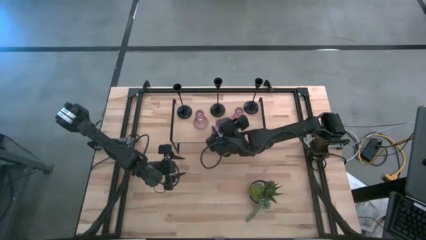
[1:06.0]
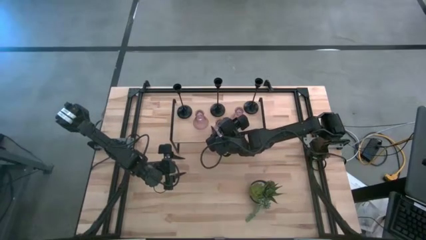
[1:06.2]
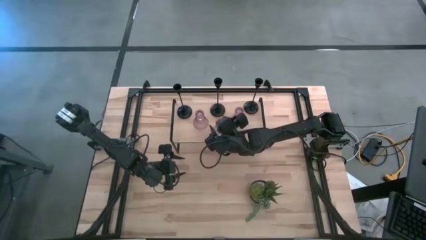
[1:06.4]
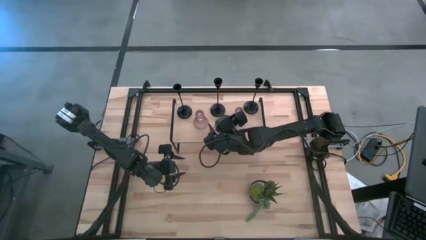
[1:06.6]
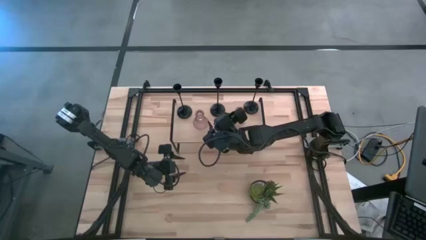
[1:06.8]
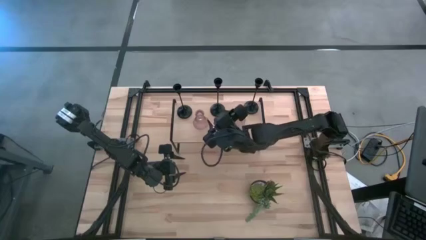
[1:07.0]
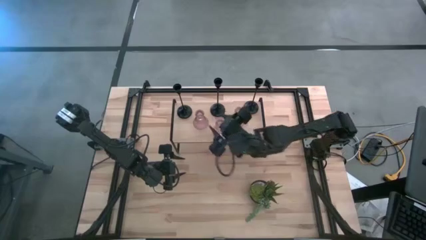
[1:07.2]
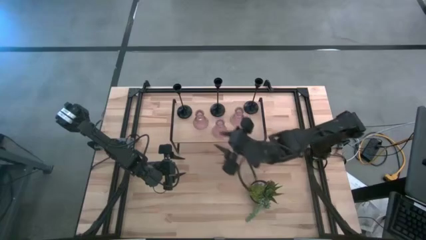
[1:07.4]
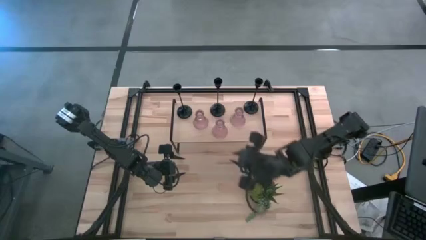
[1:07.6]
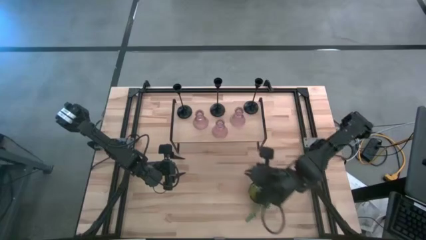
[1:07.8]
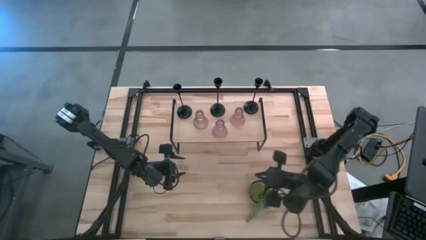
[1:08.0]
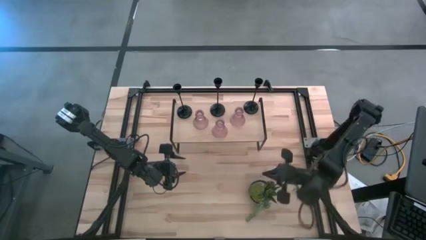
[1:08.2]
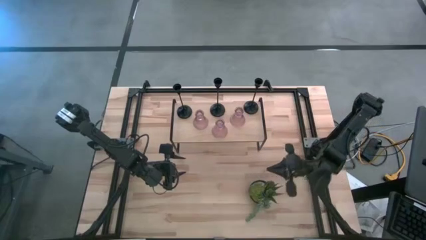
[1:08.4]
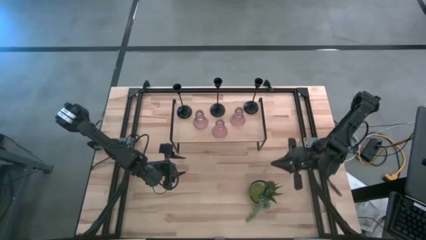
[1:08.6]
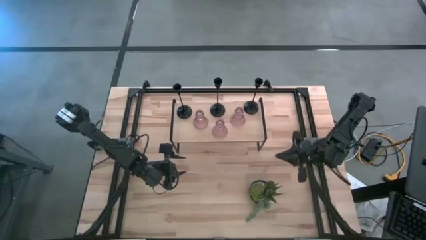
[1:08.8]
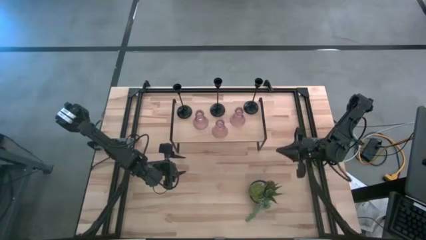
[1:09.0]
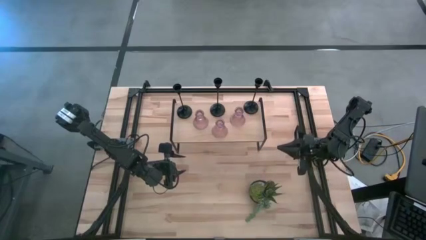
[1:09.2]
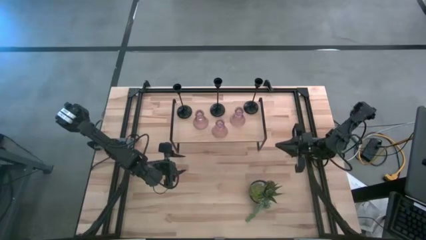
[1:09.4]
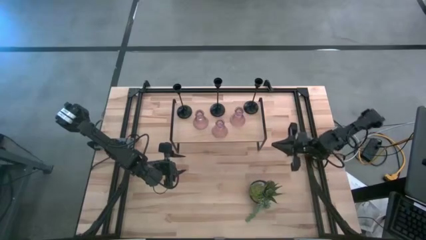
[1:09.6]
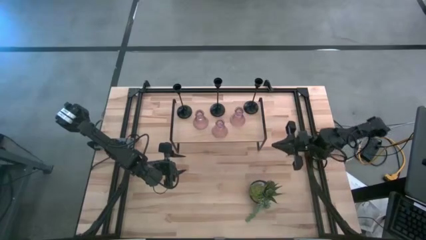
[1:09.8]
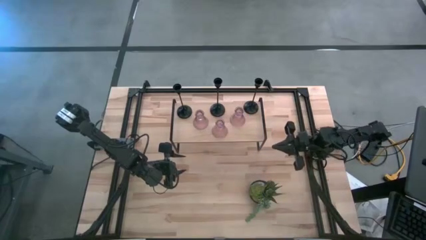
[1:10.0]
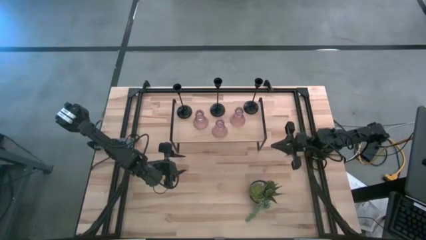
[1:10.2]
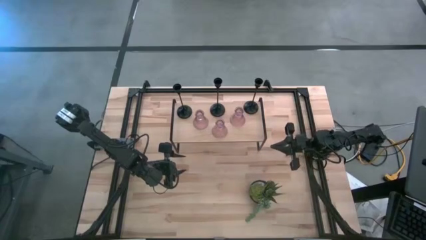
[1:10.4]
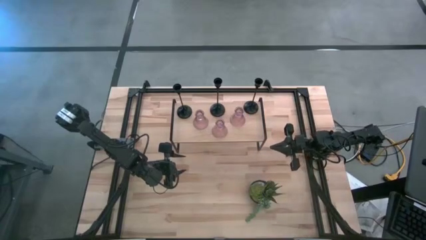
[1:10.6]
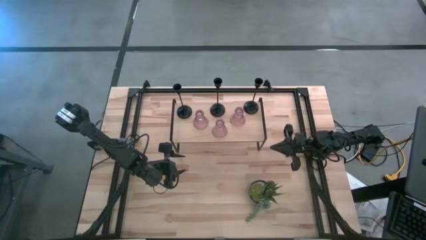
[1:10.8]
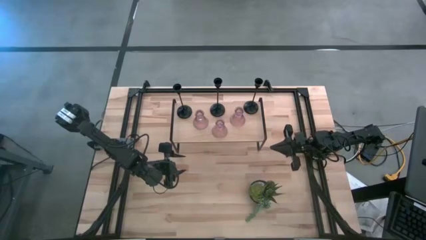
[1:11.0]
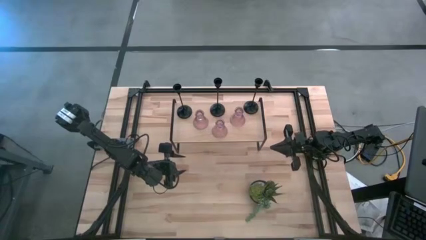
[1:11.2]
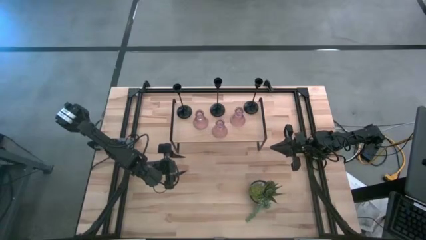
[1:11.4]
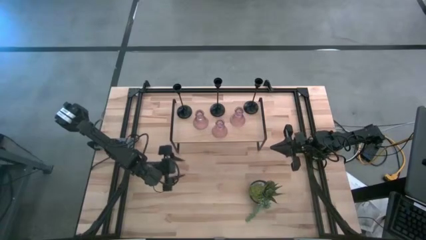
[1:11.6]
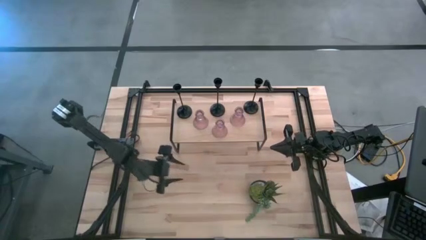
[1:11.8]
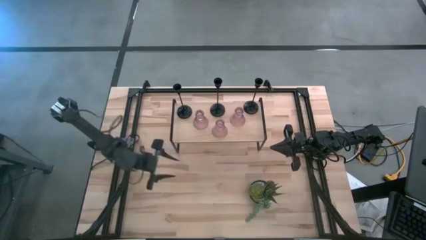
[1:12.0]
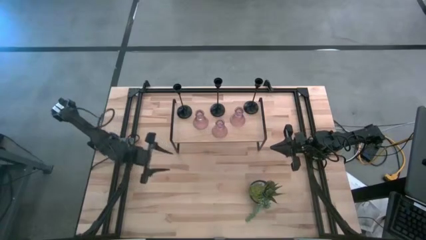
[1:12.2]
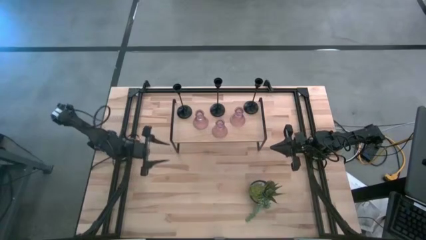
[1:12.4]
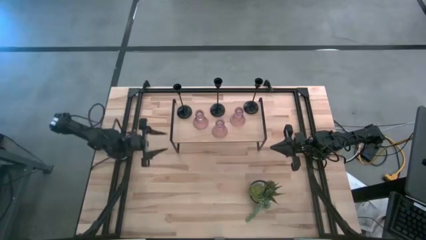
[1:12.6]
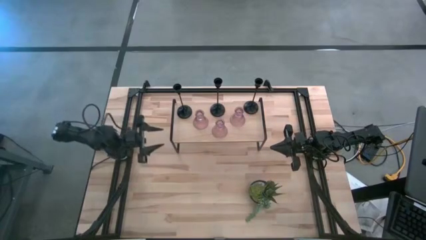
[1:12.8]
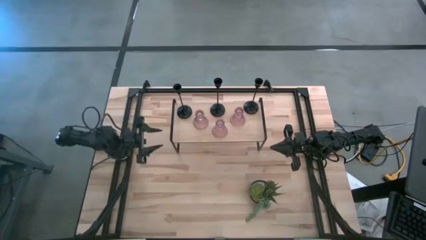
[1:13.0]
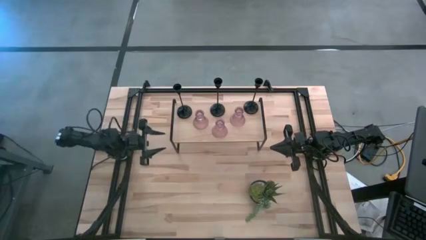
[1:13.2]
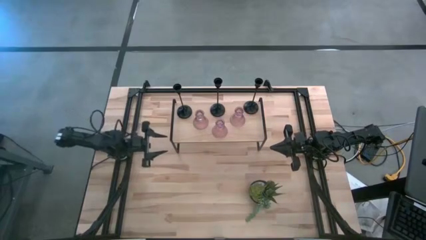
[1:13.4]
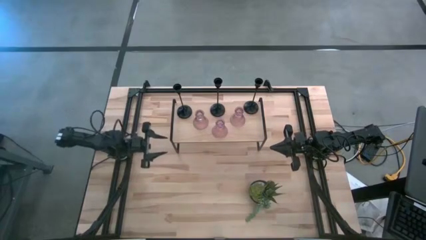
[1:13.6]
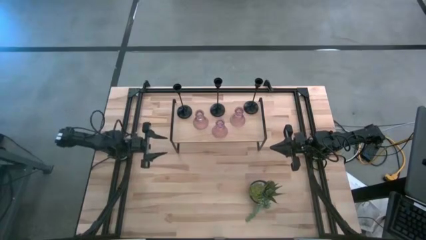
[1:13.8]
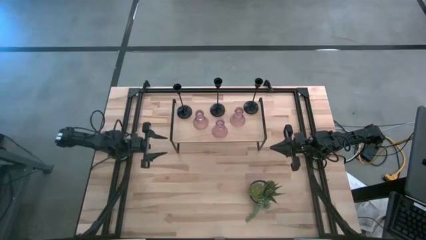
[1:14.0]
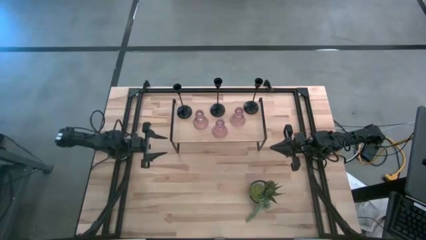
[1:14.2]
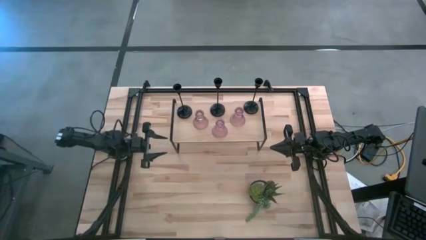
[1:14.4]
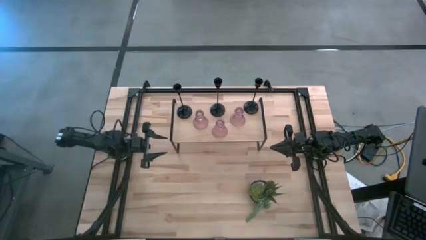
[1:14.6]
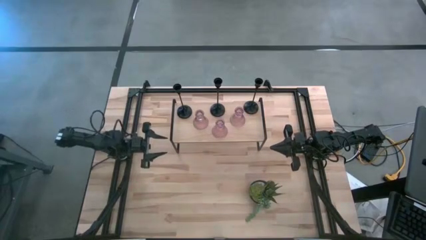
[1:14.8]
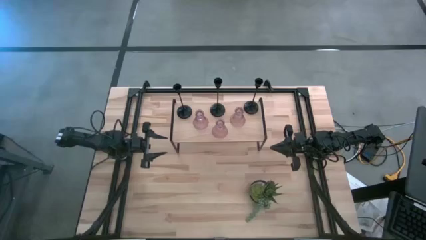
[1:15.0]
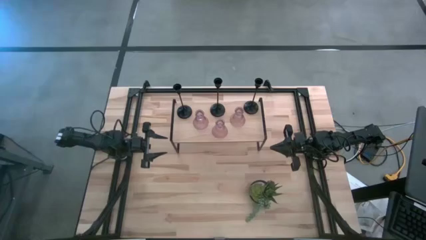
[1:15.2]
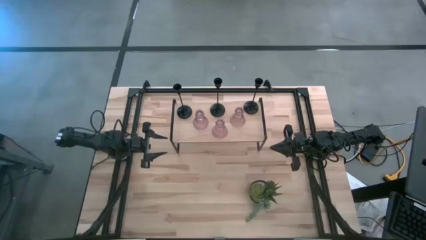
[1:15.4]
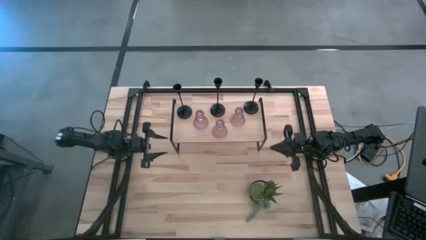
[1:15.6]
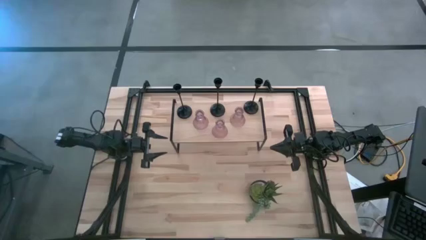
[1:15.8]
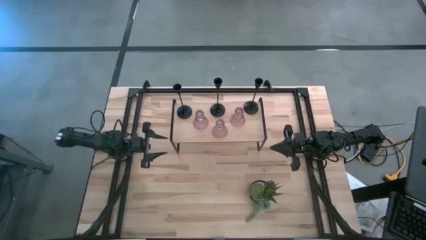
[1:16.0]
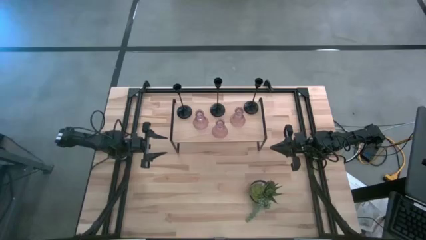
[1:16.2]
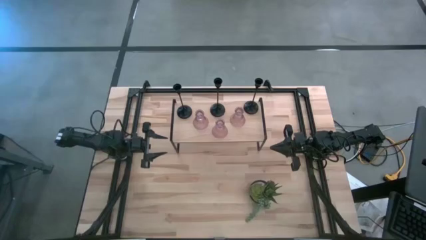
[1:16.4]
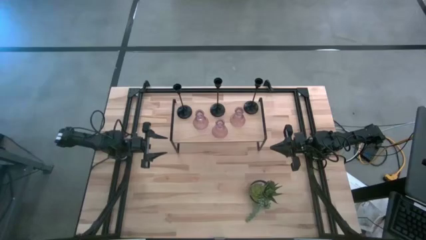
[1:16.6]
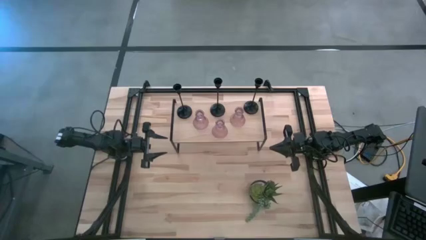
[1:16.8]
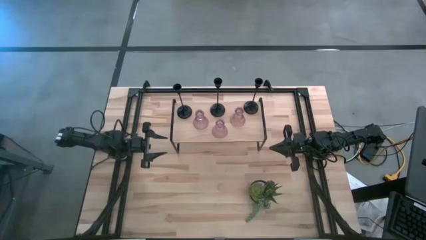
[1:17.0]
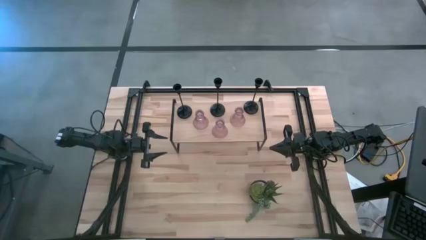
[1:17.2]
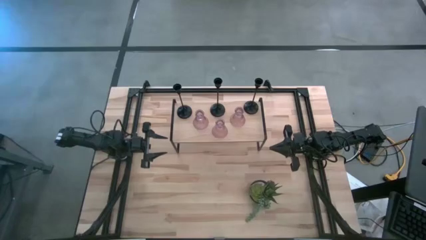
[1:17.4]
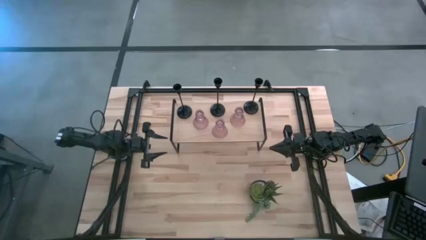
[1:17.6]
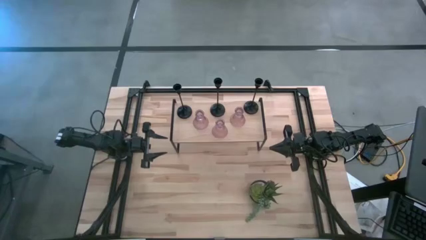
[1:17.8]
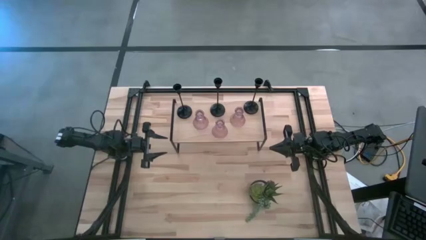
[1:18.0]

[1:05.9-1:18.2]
Task: Pick & Place candle stick holders
Return to Home Position

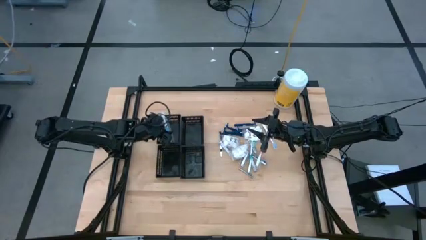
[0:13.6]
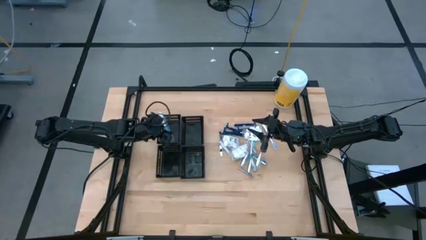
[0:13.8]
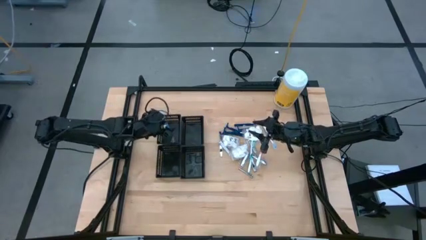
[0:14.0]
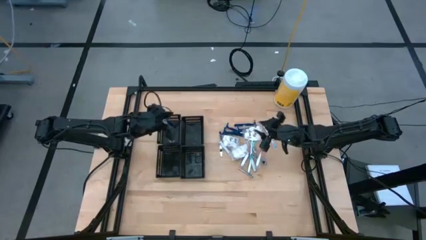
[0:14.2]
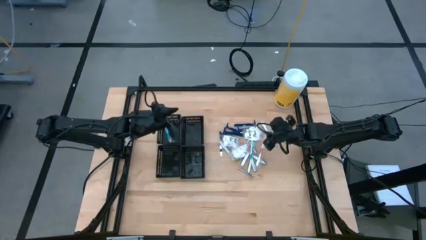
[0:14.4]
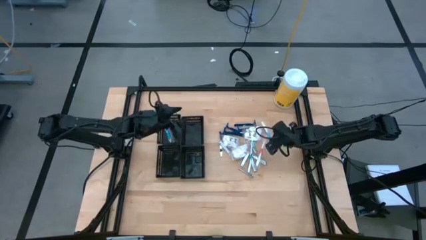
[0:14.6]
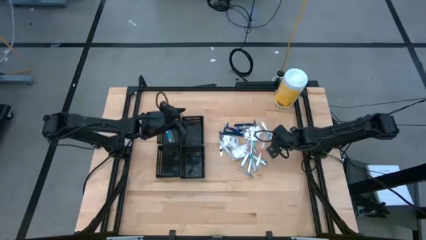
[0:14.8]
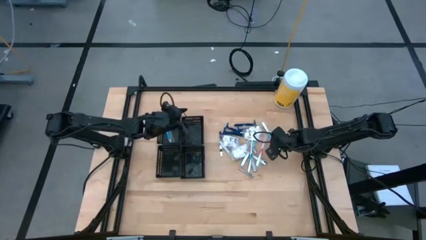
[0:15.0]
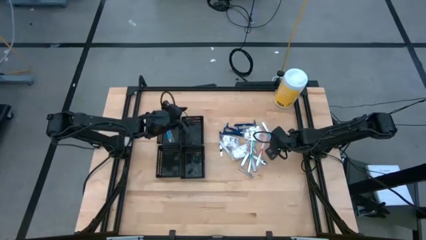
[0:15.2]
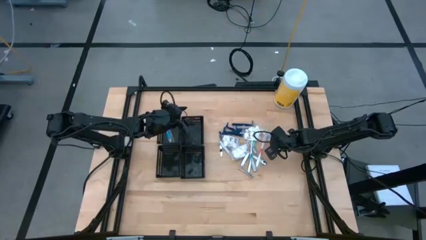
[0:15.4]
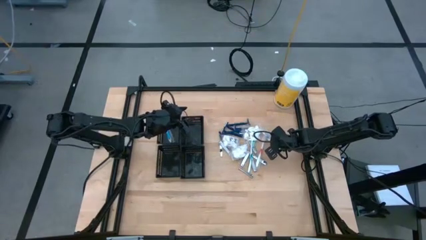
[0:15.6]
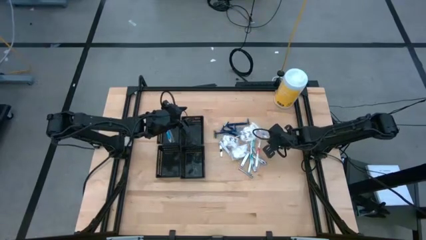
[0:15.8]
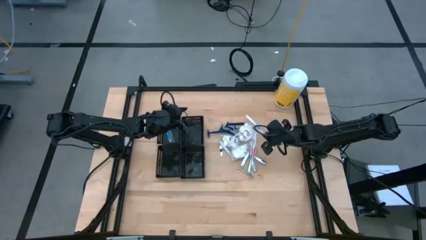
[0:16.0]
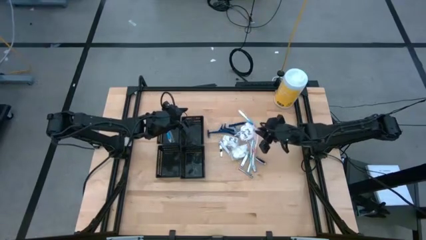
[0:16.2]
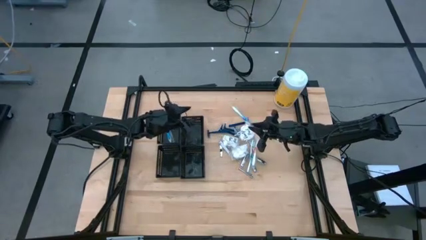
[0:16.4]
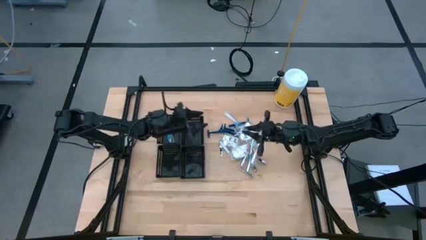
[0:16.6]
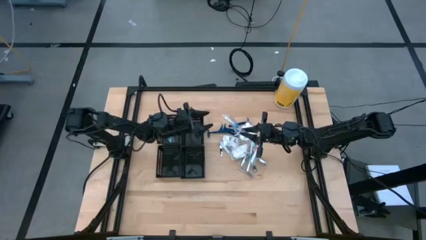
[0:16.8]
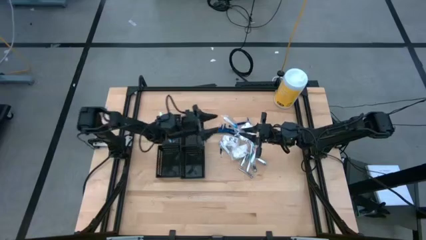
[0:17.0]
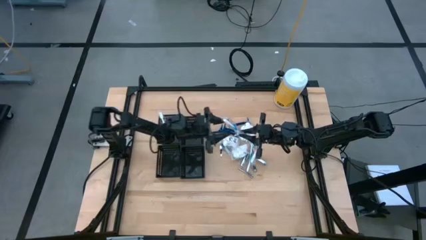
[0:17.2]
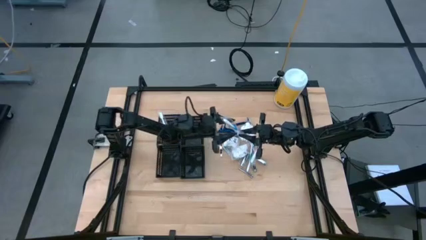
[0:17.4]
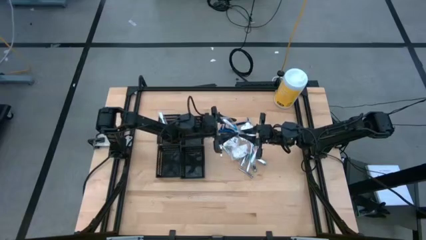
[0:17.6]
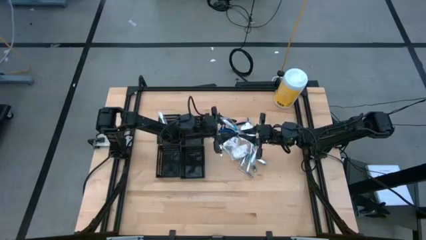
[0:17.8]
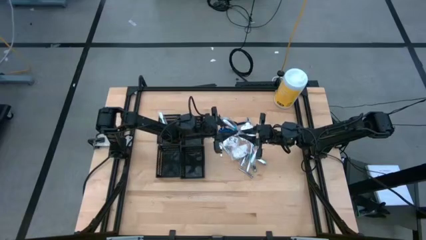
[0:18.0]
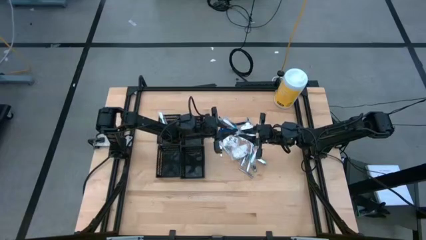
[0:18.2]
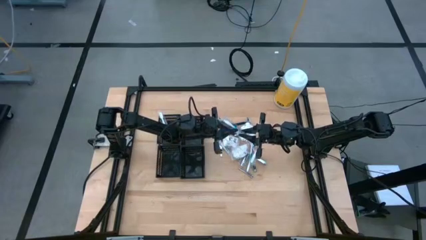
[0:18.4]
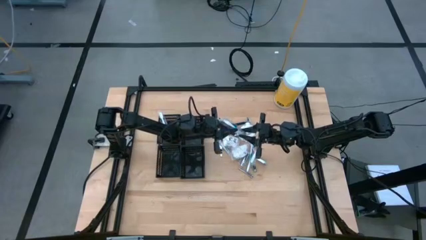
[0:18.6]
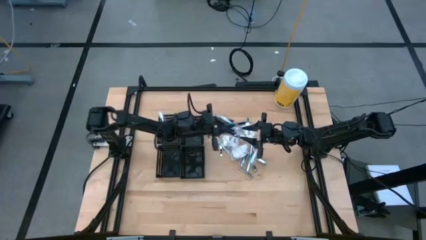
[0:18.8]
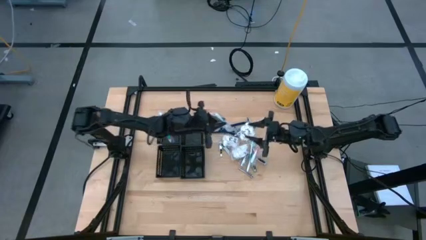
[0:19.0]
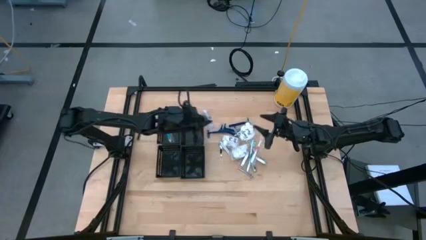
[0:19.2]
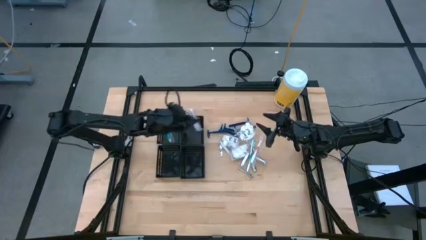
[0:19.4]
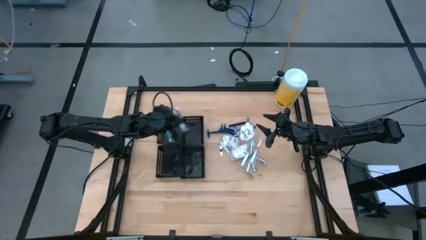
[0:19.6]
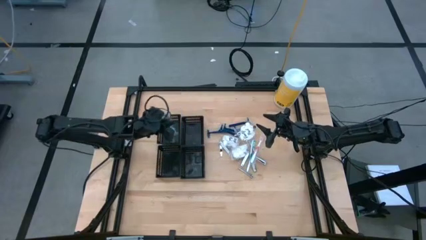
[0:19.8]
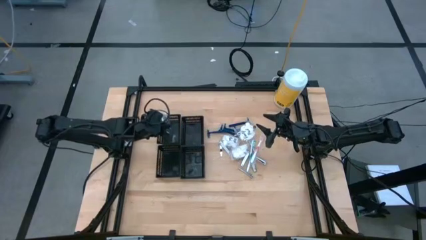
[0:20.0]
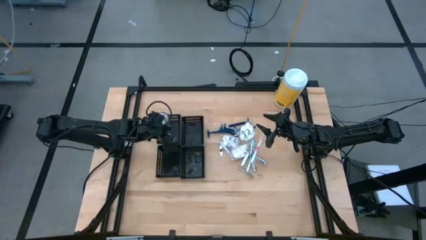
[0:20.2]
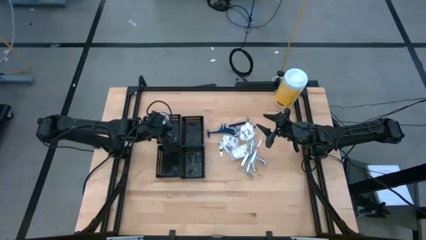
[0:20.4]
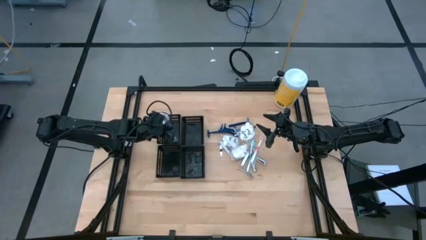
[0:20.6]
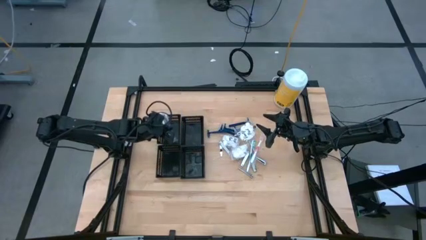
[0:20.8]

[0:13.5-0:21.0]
Task: Pick & Place Travel size toiletries
Put the blue toothbrush into the top left black bin
